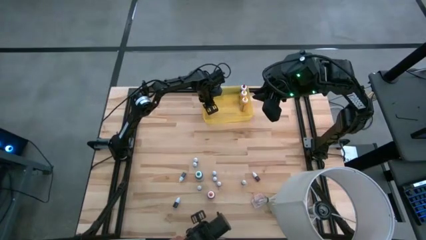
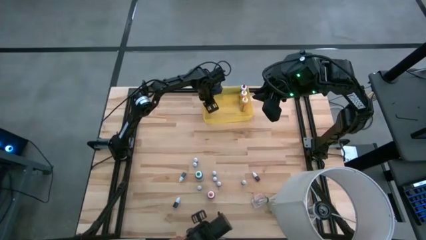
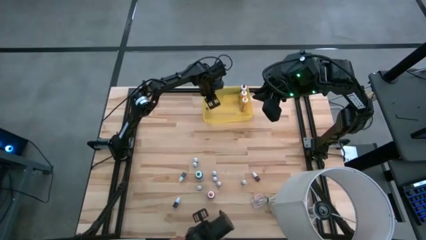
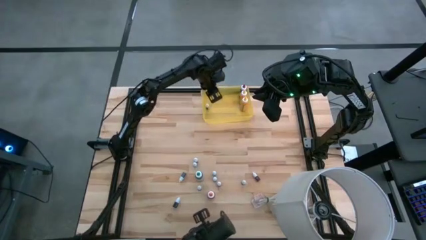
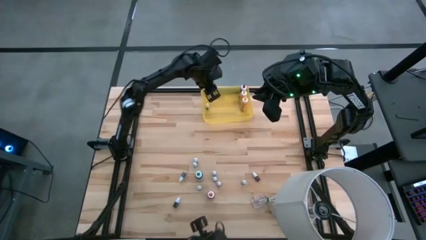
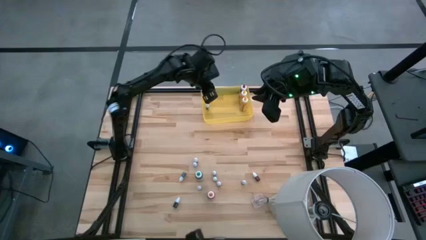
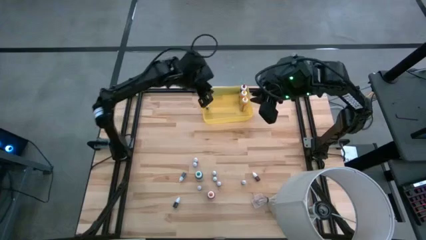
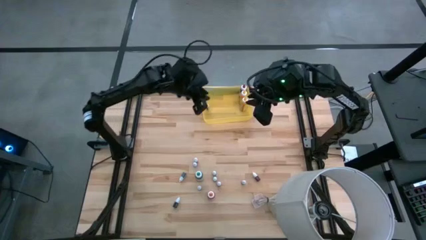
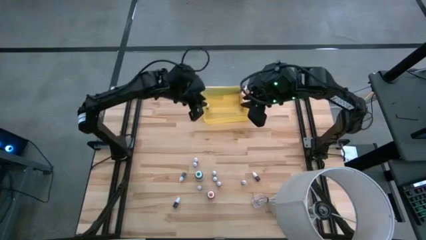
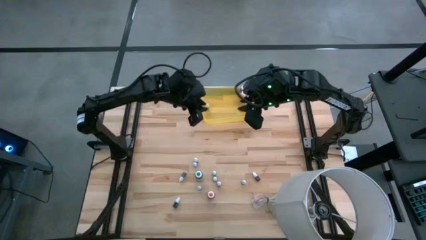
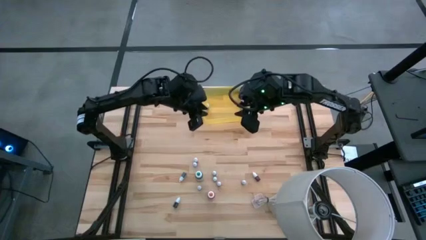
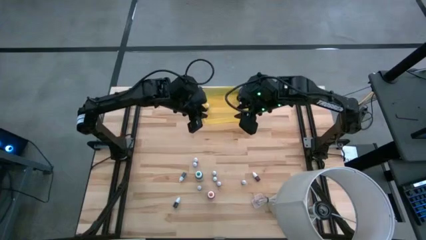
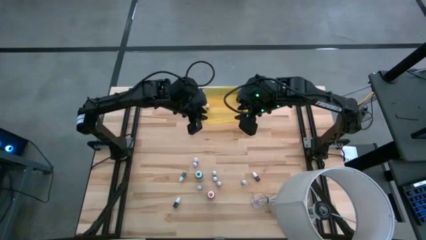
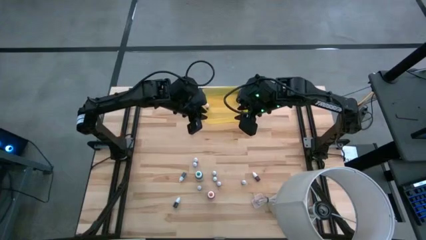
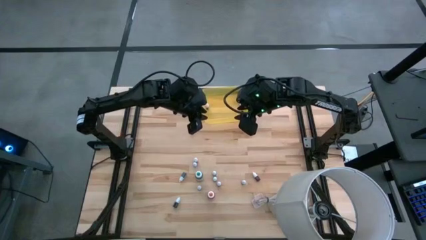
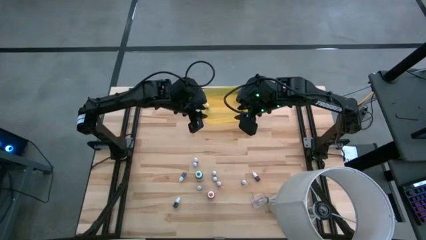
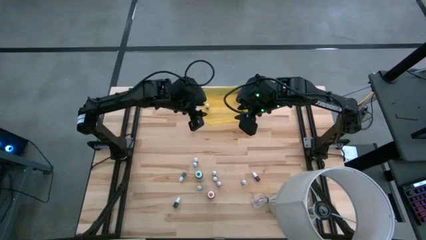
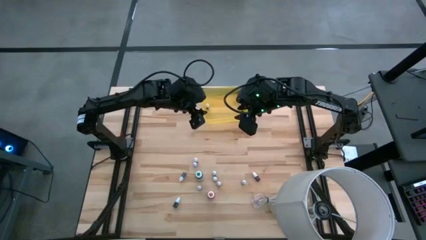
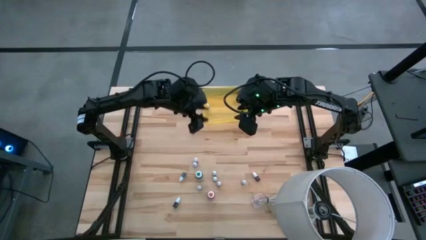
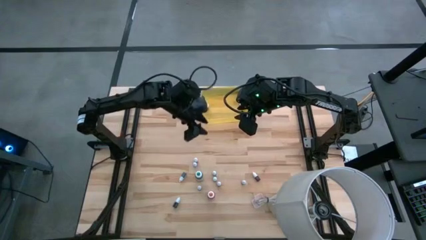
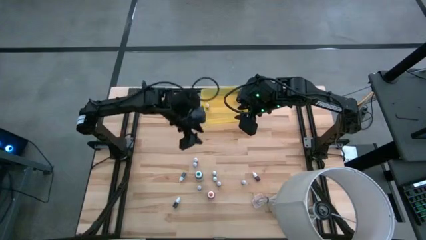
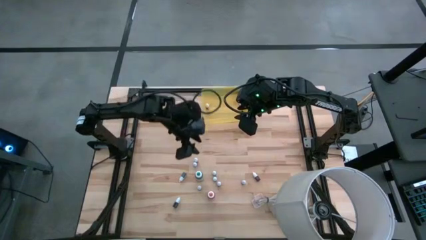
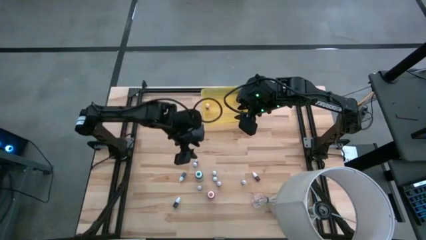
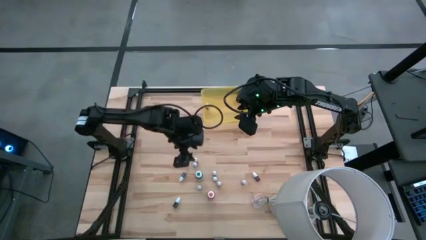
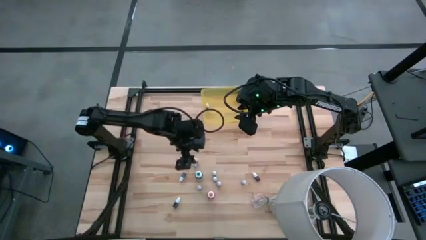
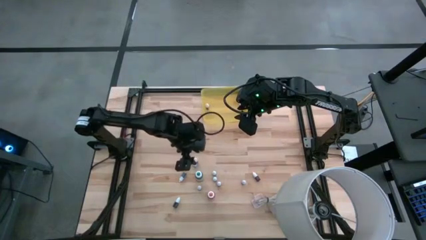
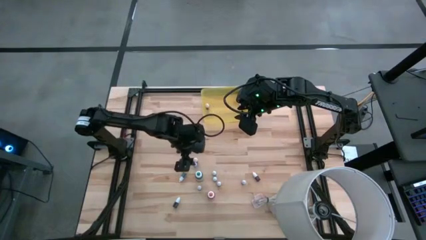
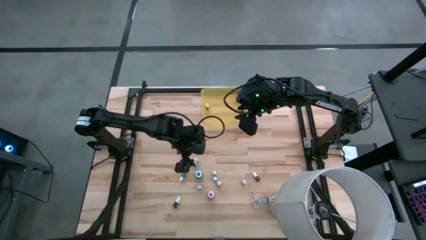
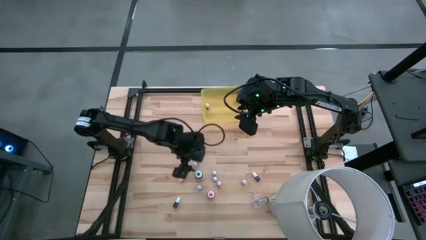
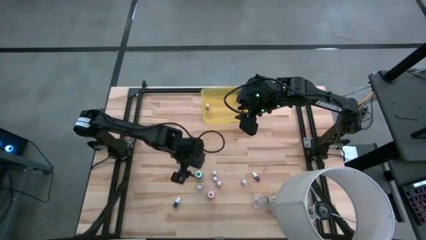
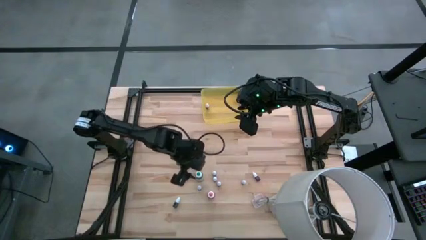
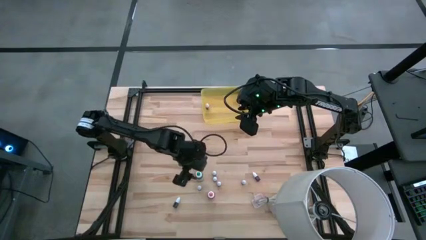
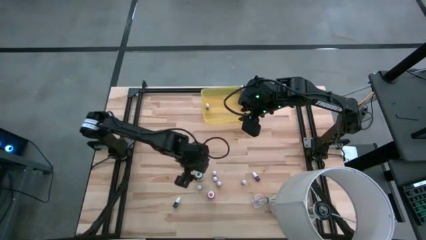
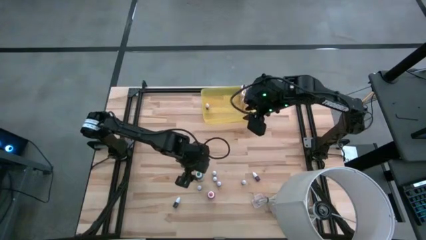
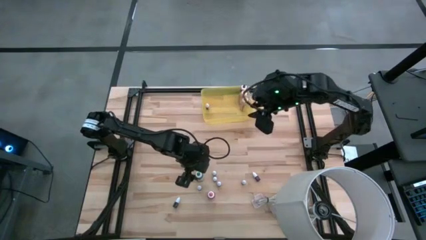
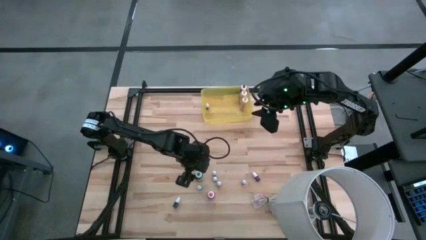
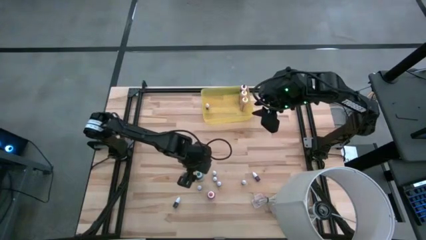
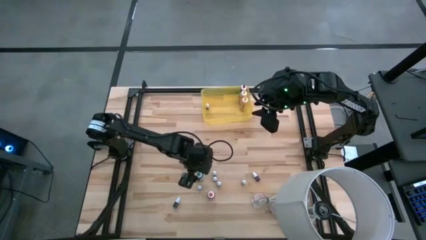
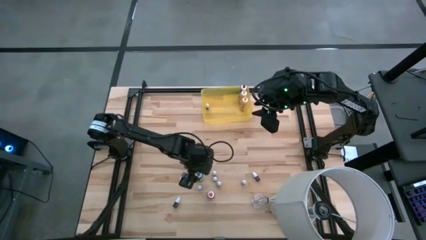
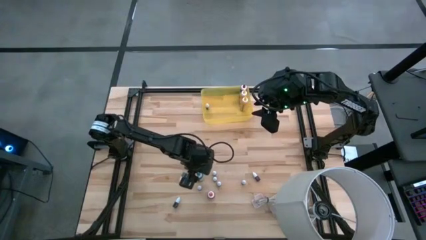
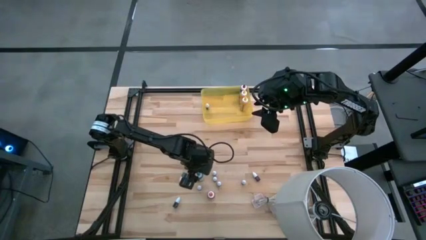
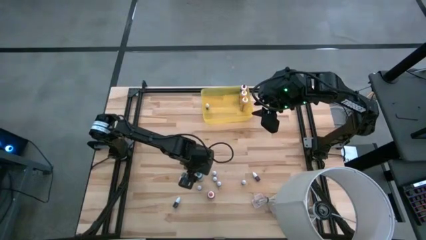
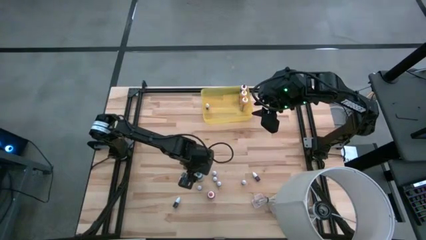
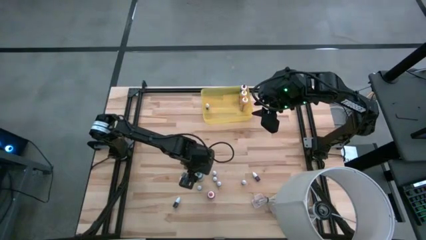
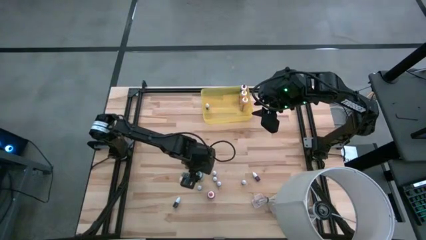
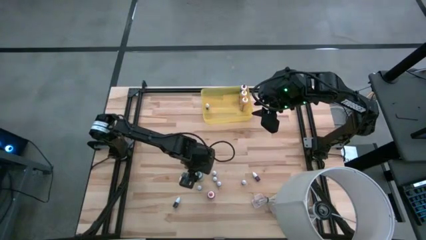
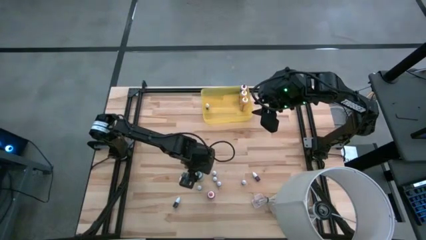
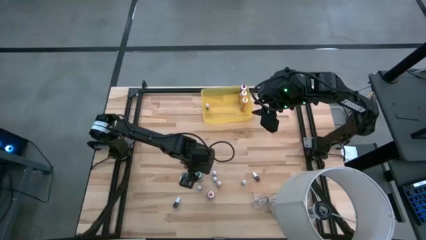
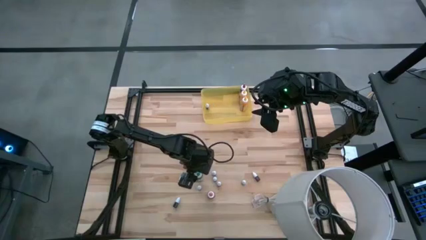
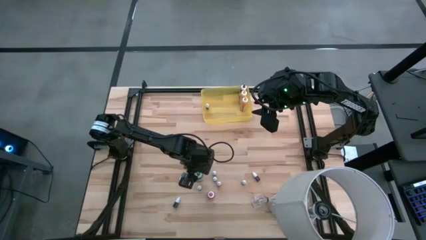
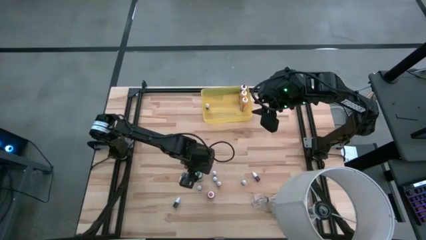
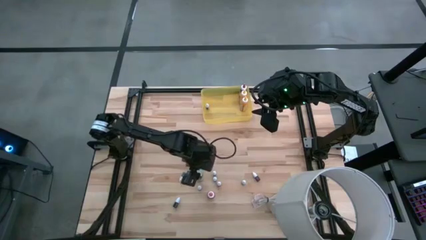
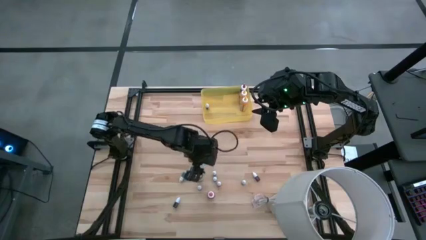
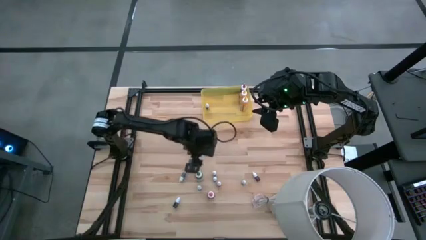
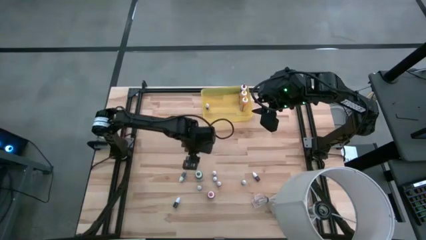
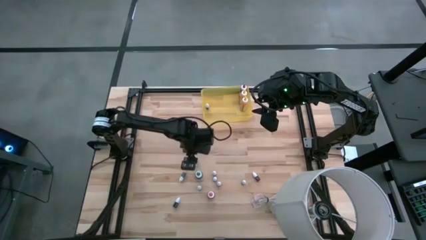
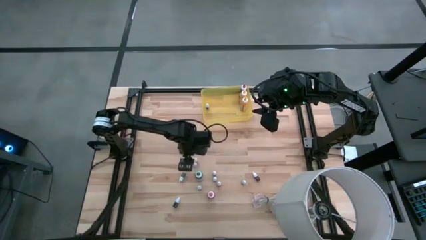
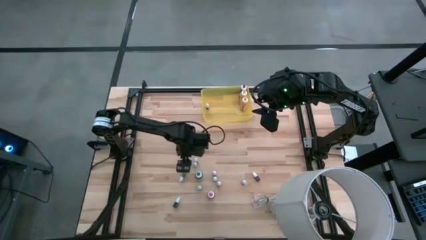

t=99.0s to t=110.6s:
Task: Pick & Place food coloring
Put the top small violet food coloring bottle into the yellow bin
